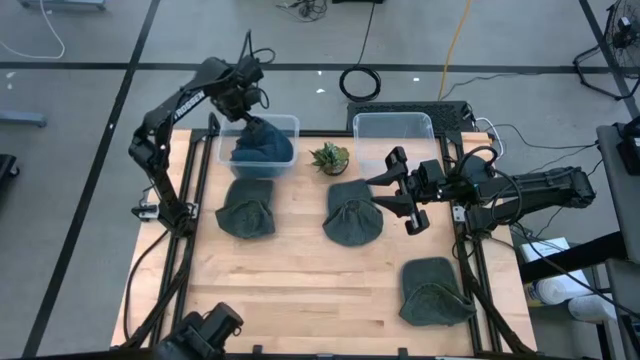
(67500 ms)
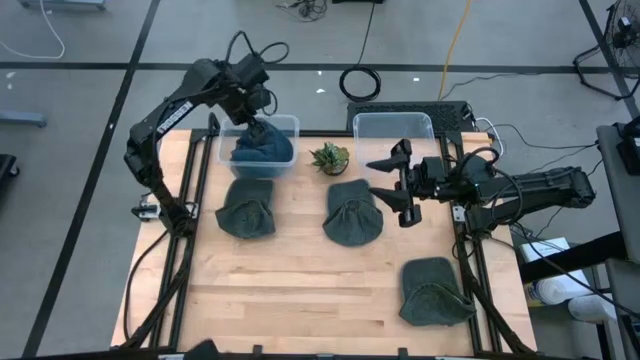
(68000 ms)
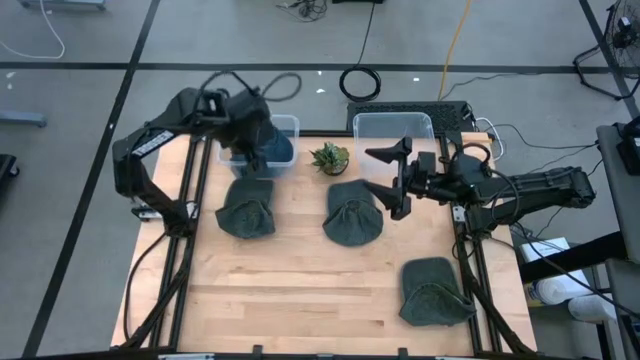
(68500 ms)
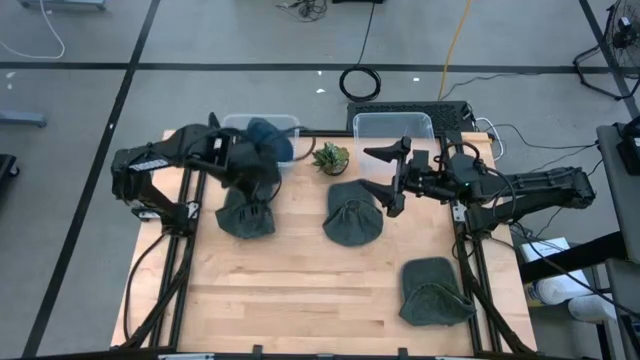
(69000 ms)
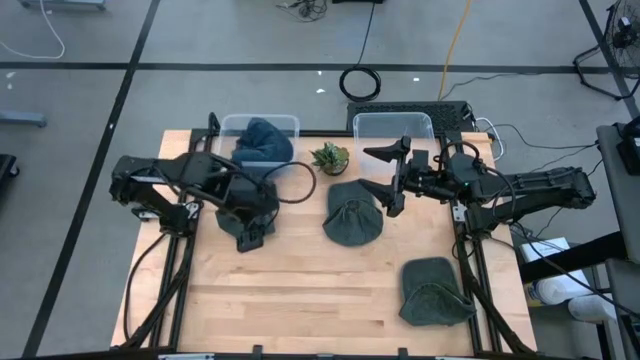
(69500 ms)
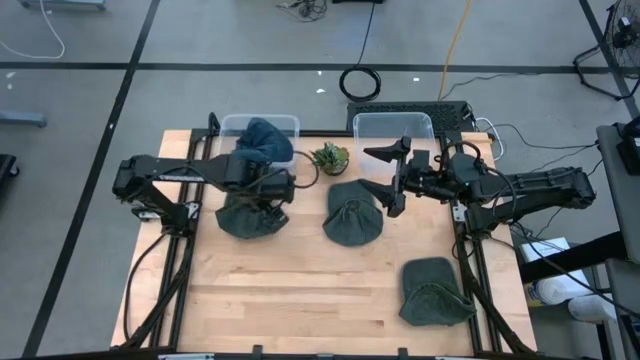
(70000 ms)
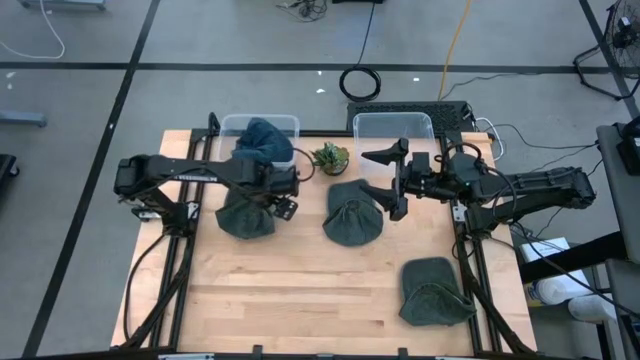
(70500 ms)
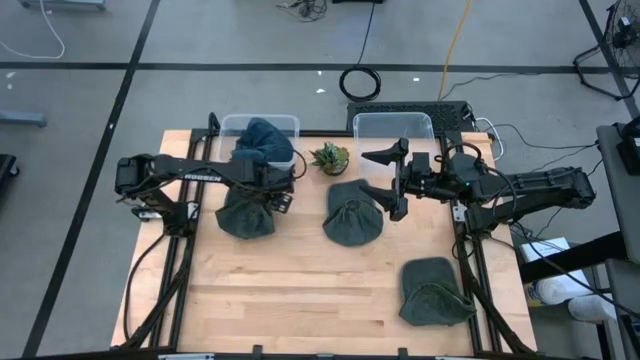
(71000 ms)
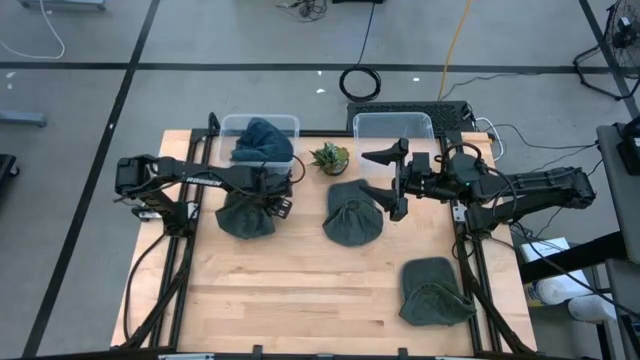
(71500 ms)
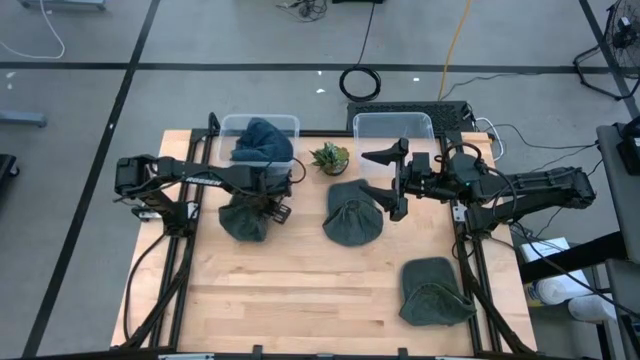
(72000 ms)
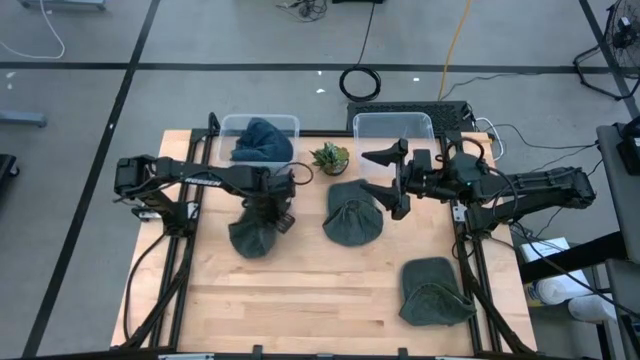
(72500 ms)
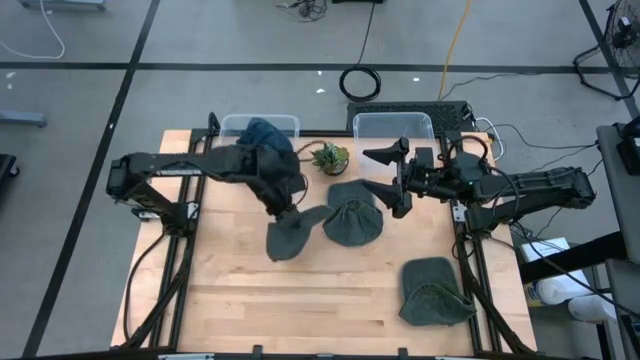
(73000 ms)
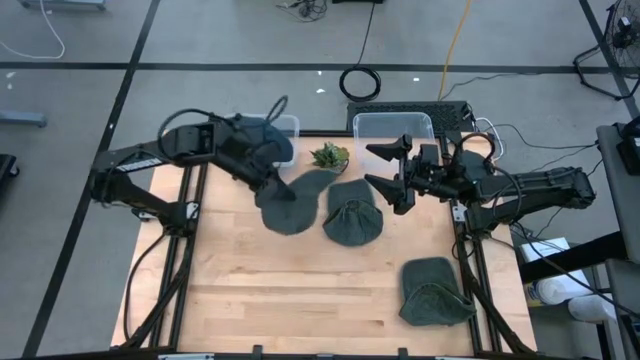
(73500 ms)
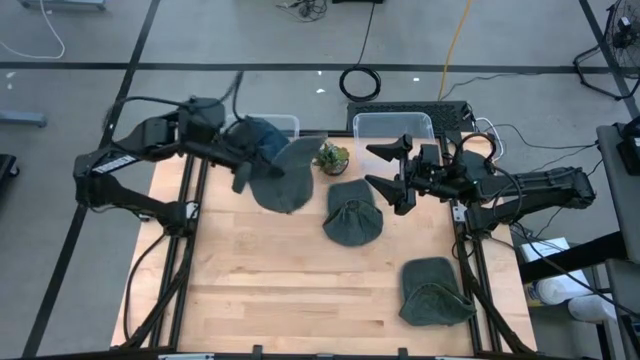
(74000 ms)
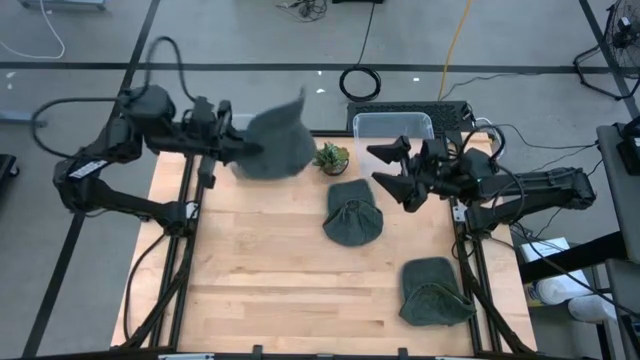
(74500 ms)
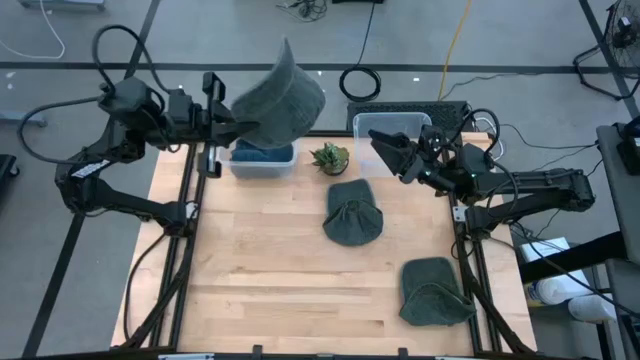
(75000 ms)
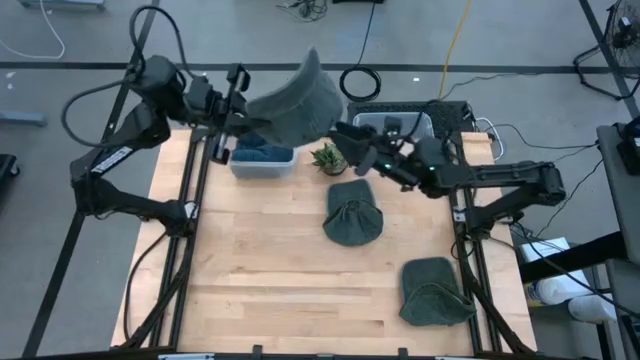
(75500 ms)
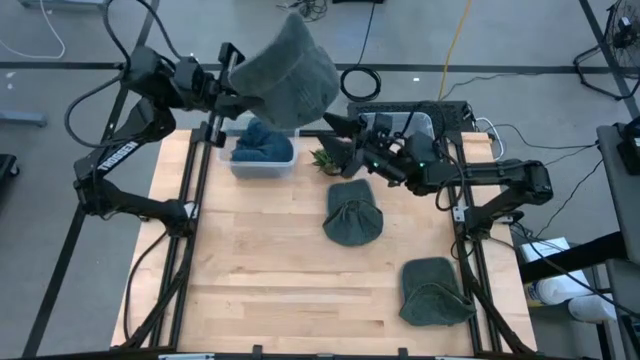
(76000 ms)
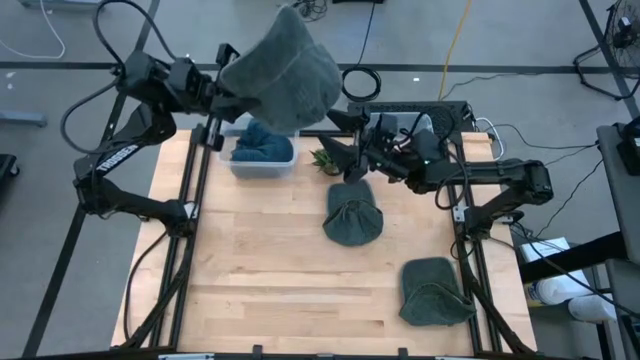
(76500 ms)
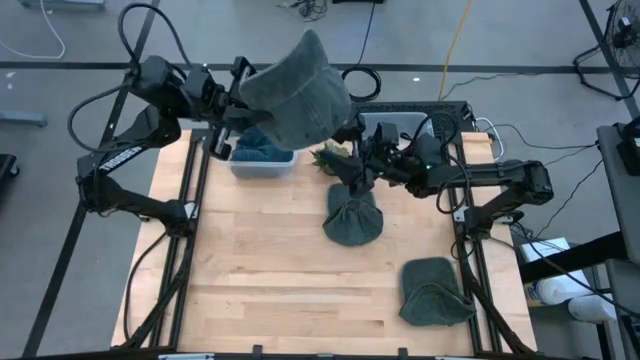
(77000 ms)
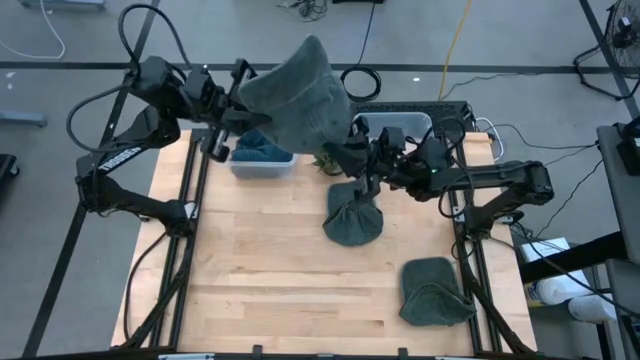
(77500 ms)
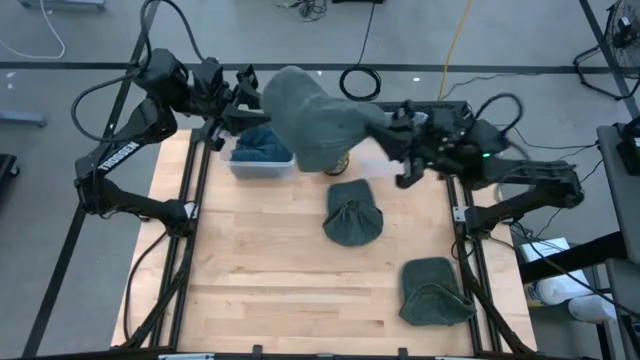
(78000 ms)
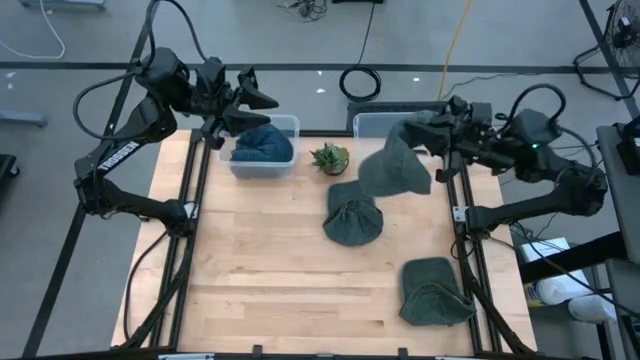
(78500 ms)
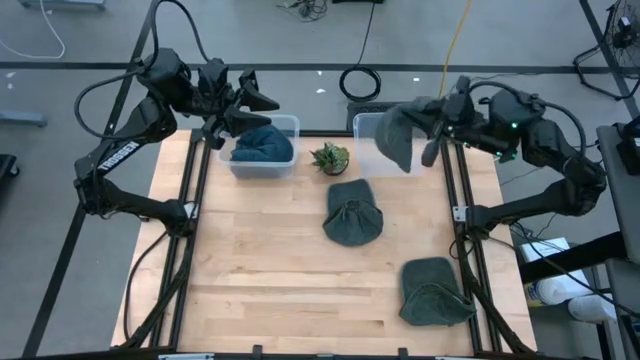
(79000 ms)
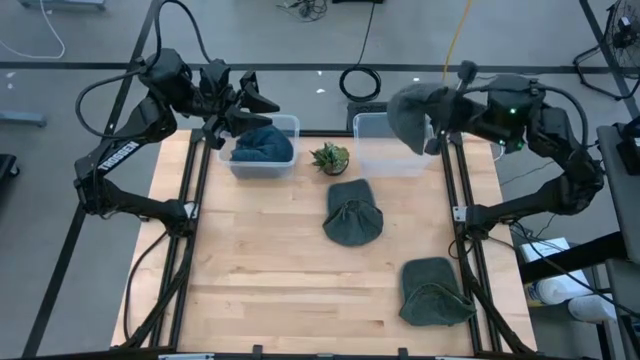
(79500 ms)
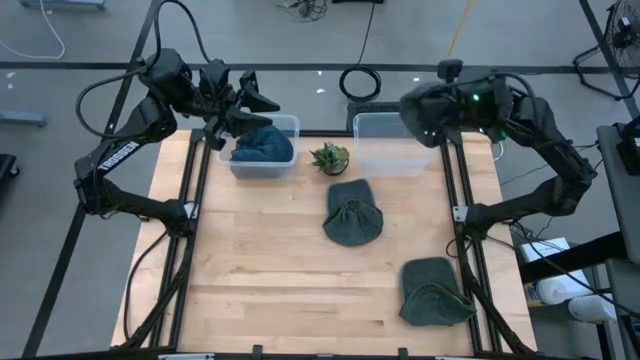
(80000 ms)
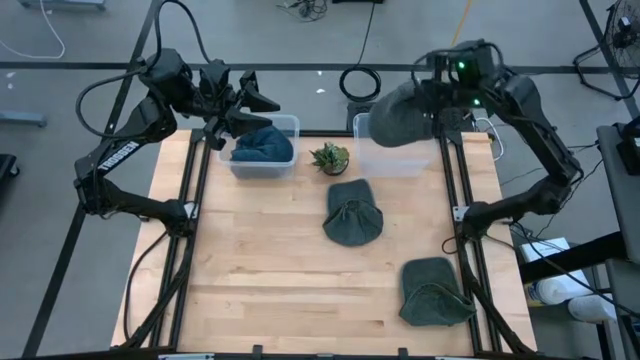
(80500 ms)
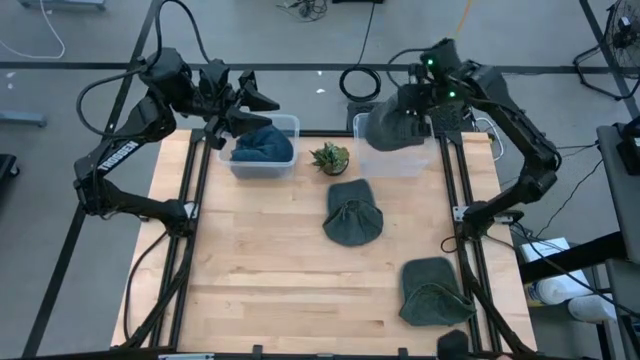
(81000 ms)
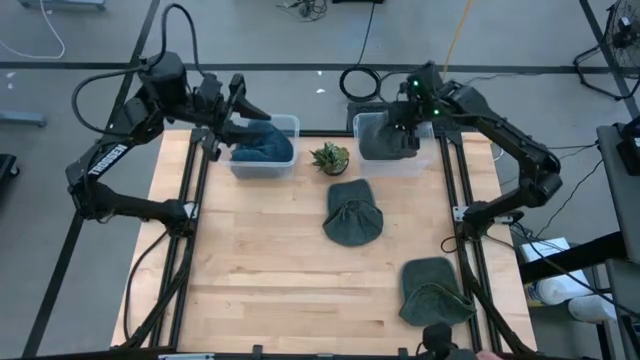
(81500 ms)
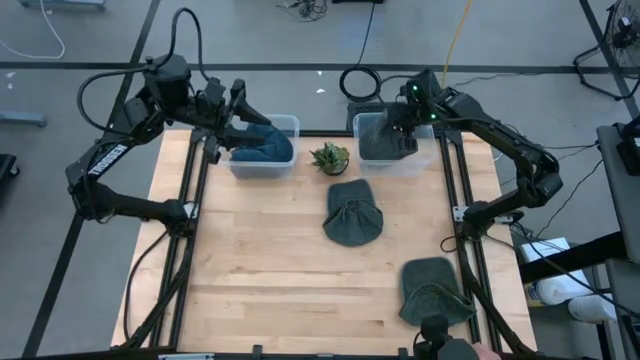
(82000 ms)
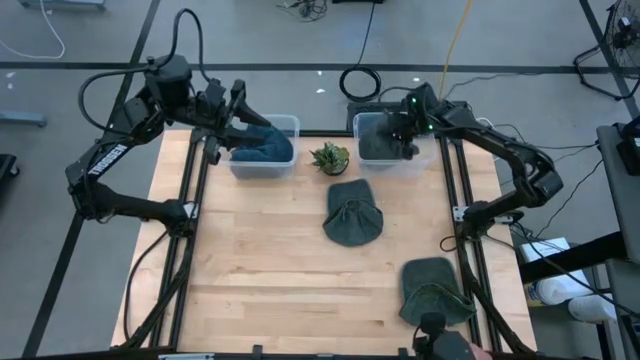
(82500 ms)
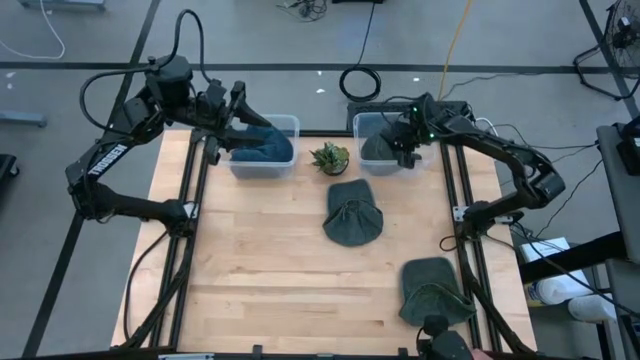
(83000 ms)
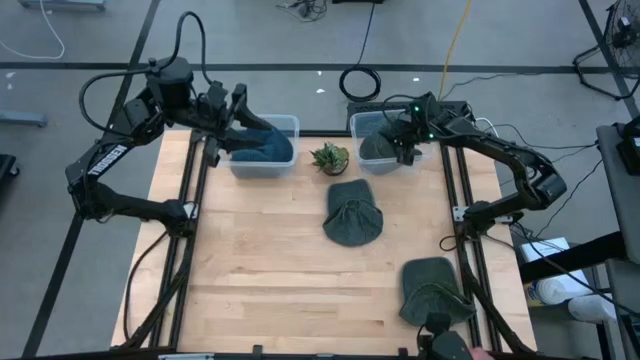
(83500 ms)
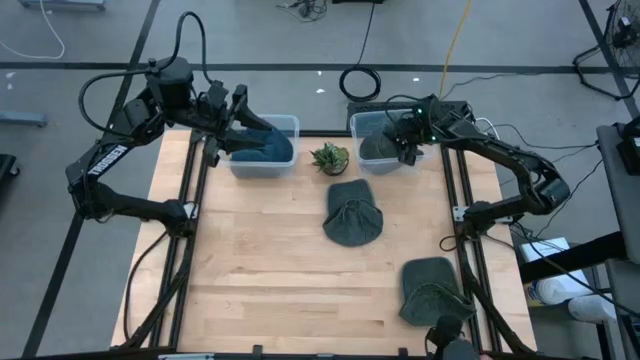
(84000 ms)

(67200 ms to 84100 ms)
Task: Pick & Place hat
Put the top left green cap into the right transparent bin

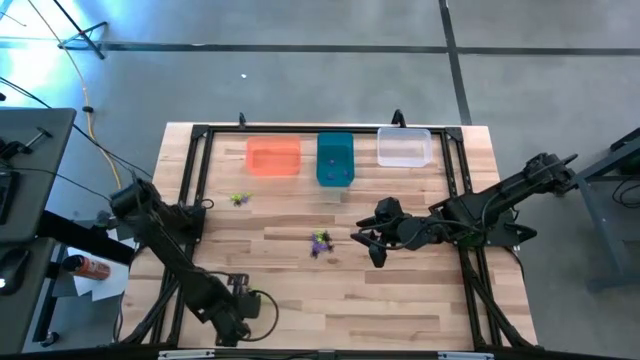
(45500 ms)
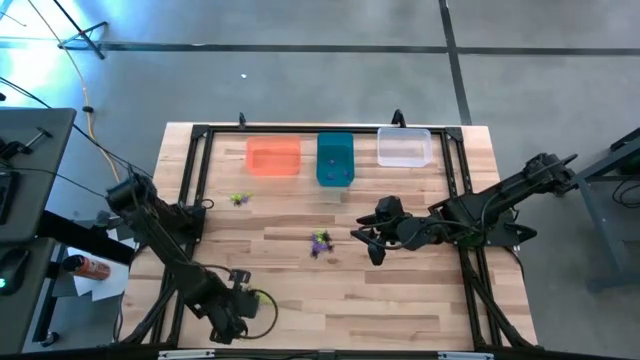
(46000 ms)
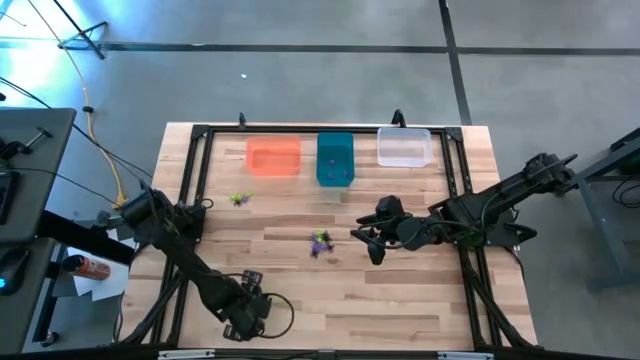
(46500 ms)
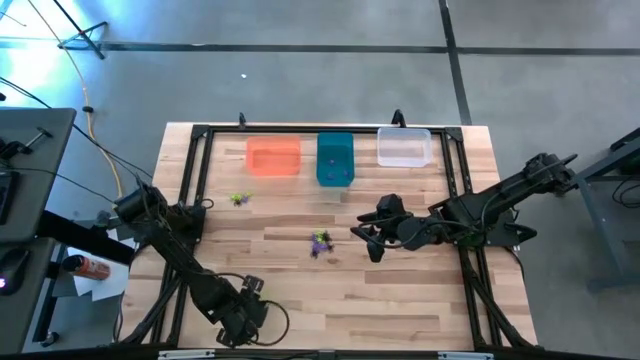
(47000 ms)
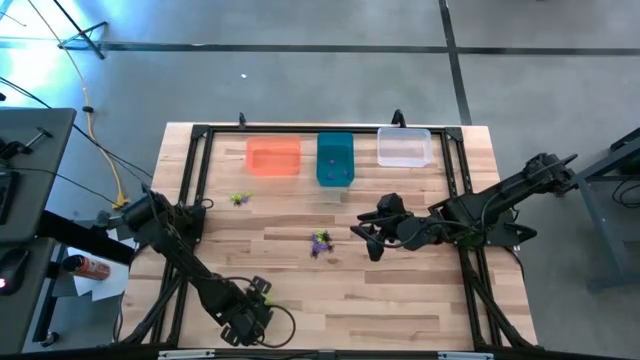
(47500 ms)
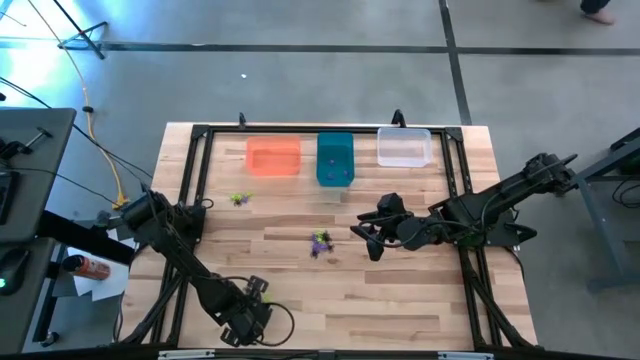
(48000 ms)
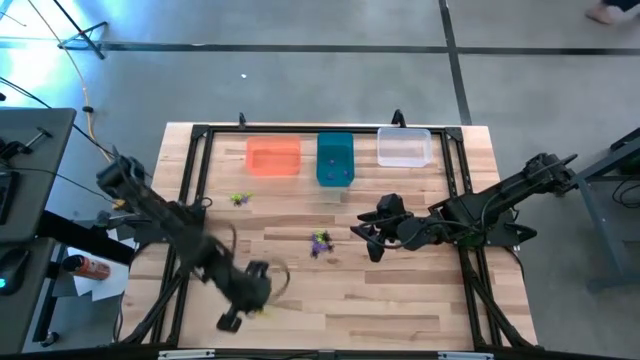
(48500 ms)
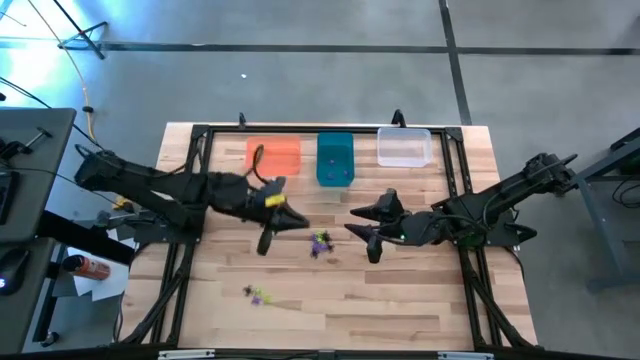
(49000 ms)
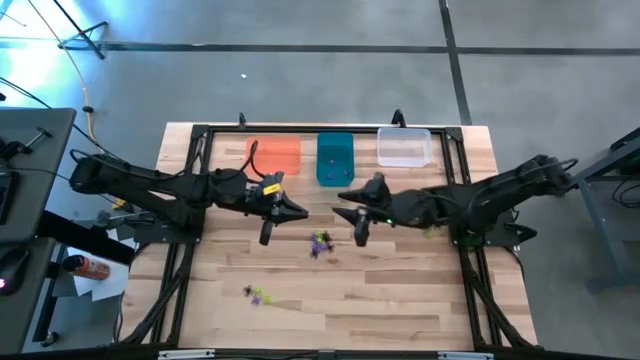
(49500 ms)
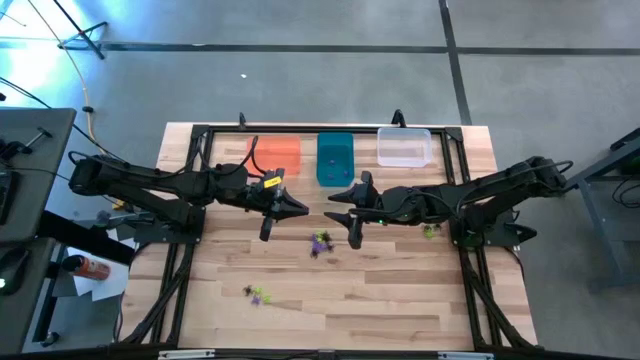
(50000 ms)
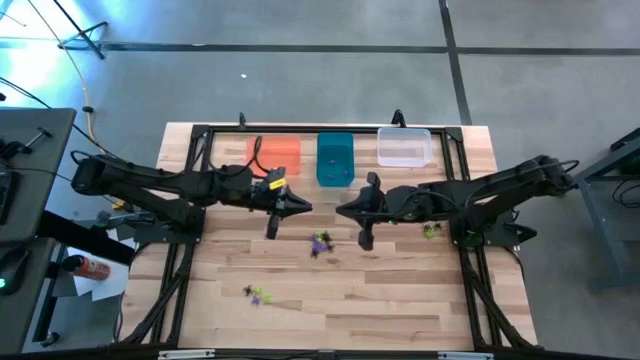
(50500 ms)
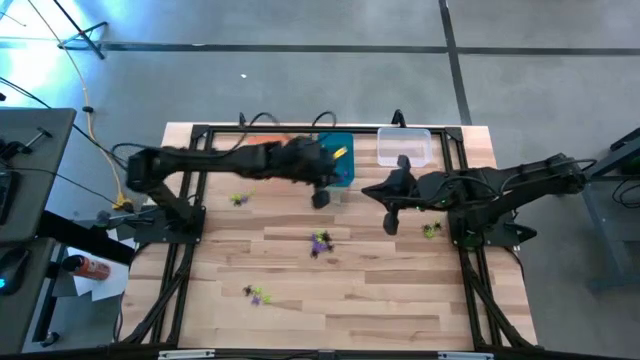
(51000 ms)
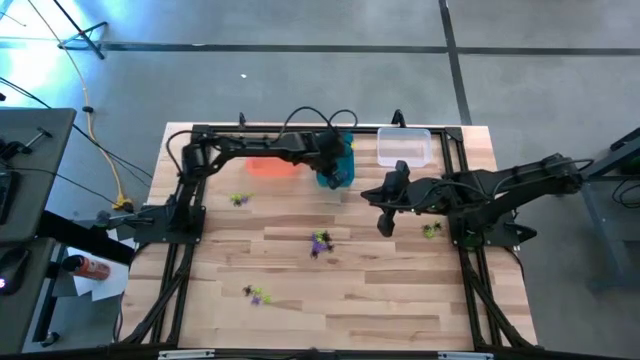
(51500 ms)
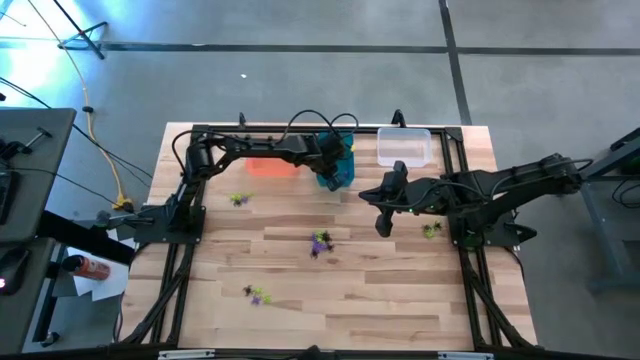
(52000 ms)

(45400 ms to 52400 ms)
Task: Sort Halloween decoration
Put the purple spider toy into the blue bin
